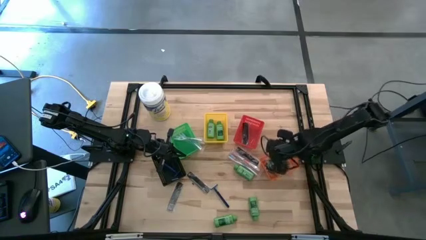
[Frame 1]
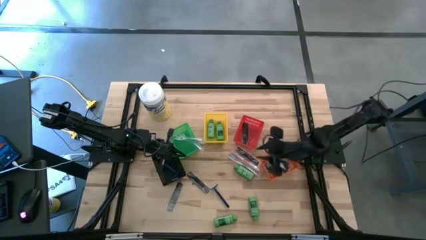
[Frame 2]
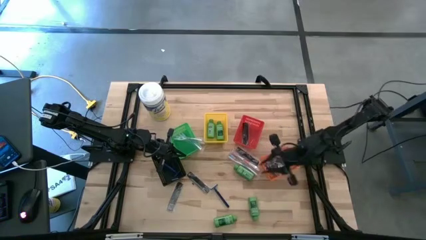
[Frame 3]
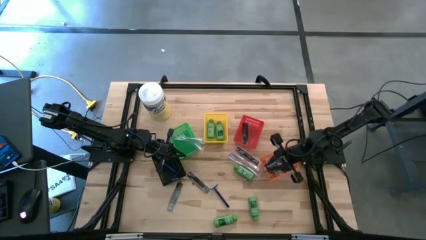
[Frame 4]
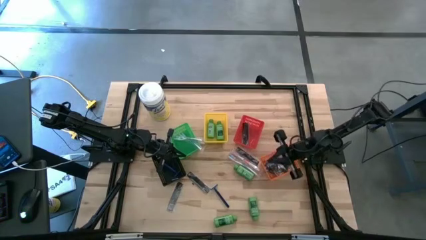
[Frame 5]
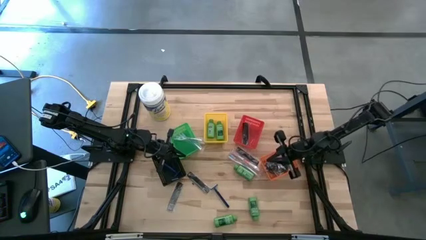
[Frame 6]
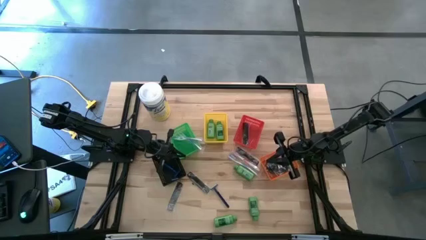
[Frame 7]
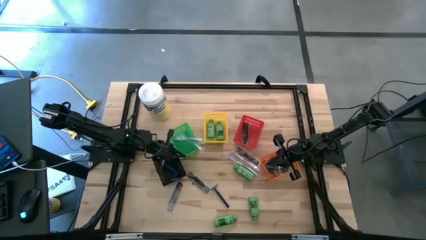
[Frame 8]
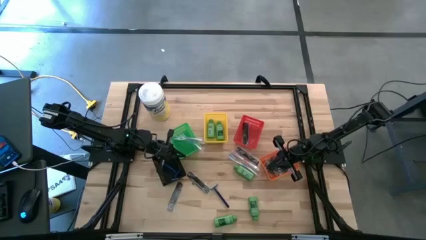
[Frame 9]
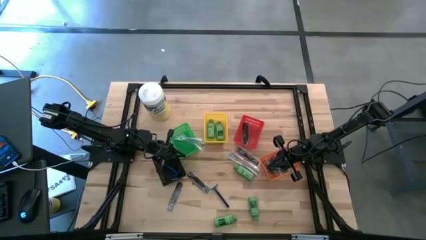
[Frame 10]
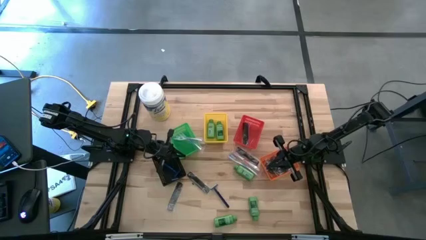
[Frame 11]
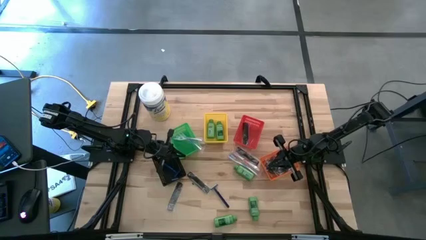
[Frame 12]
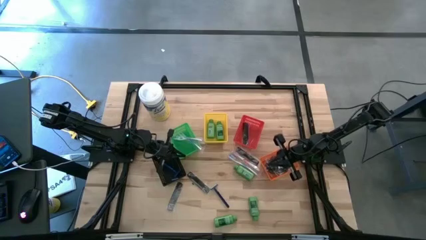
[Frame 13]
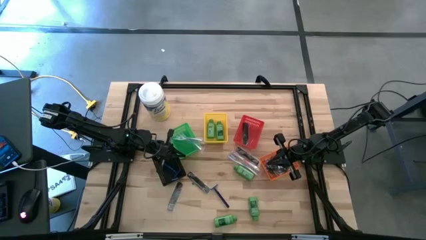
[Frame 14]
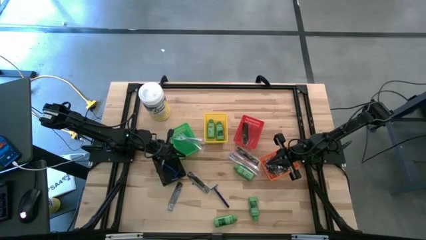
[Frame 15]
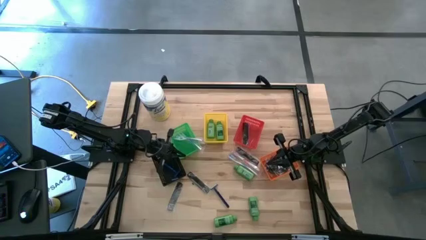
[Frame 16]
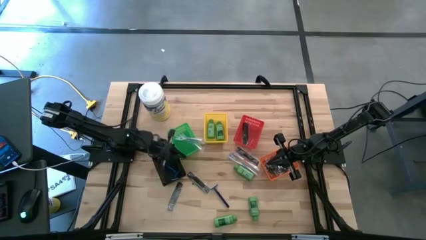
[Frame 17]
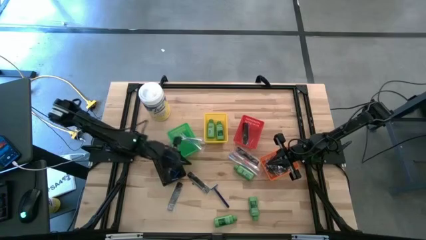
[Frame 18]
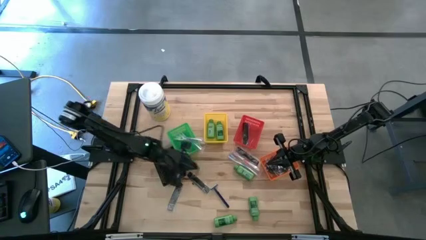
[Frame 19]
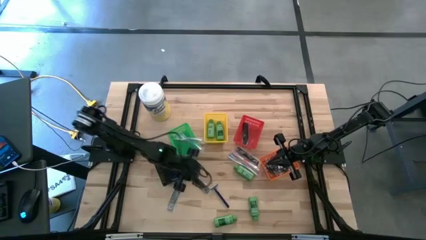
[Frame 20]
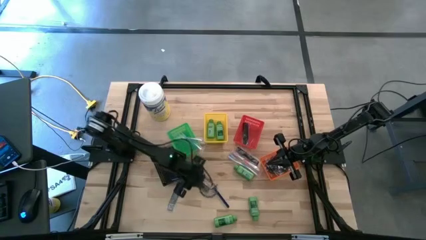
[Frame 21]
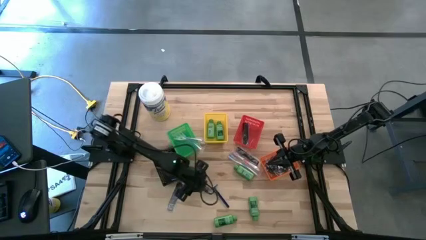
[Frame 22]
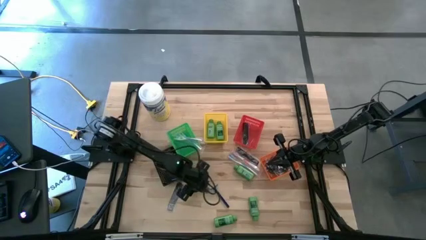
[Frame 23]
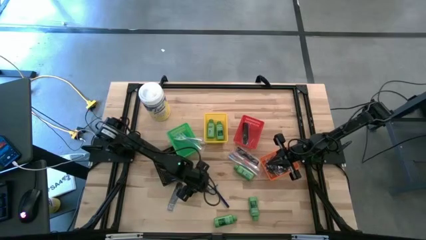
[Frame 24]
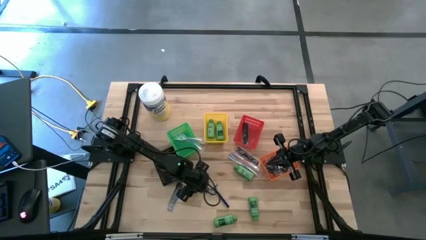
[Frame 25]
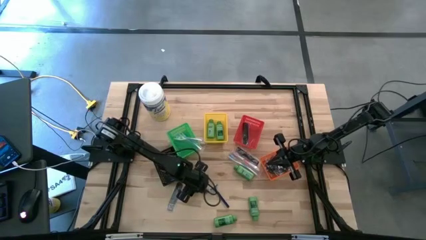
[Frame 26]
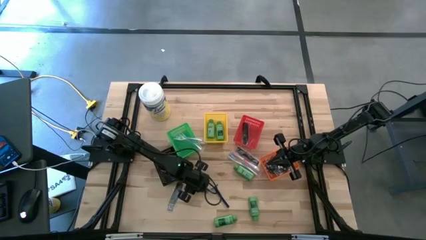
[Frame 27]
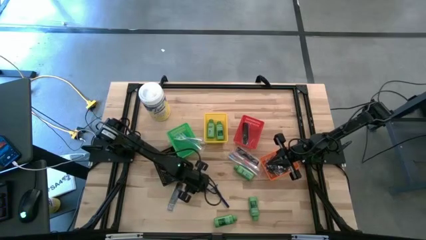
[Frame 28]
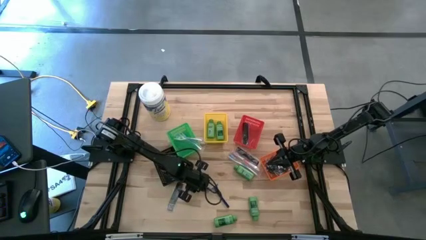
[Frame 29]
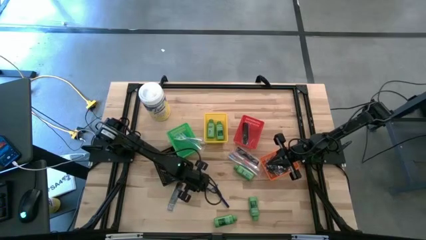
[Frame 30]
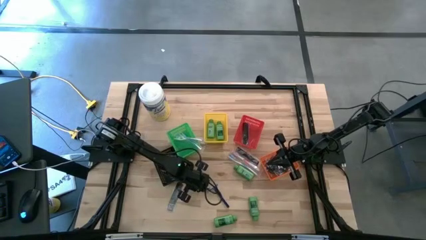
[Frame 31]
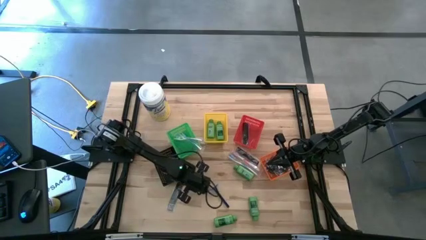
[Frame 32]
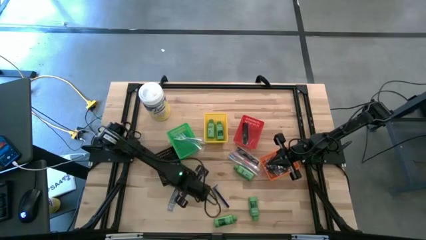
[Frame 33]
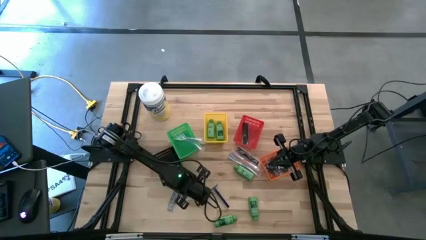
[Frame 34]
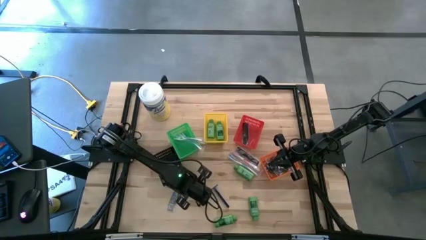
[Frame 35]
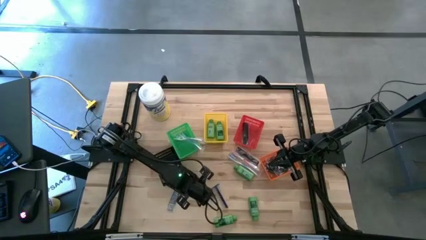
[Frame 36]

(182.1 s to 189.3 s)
Task: Pick & Place Travel size toiletries
Put the black comb into the red bin

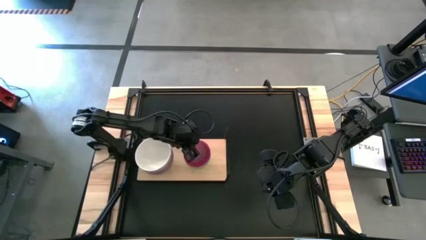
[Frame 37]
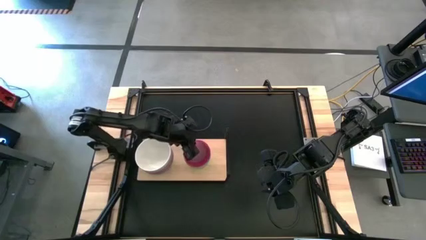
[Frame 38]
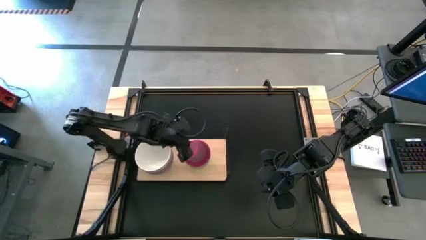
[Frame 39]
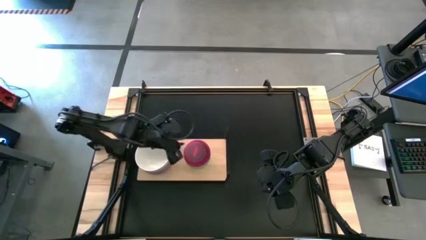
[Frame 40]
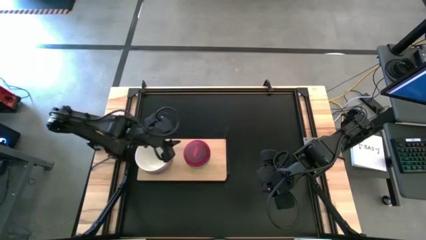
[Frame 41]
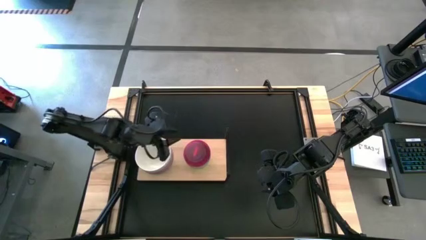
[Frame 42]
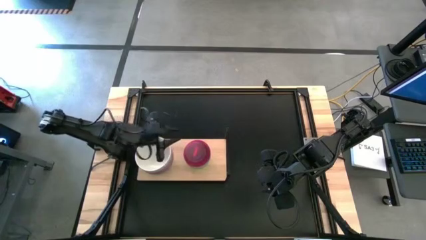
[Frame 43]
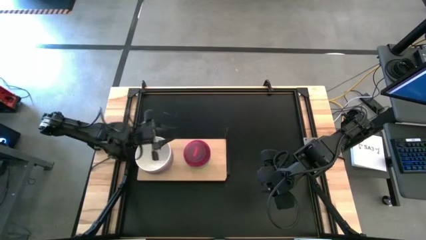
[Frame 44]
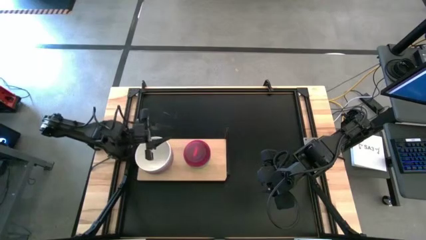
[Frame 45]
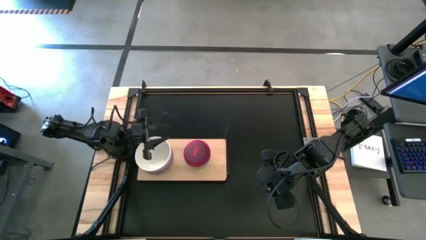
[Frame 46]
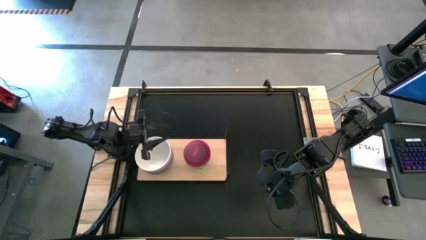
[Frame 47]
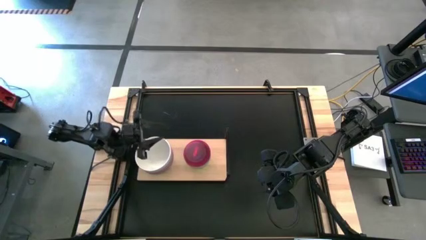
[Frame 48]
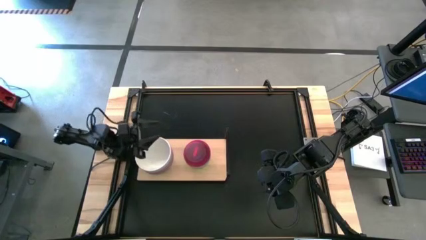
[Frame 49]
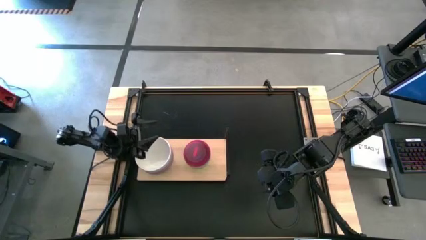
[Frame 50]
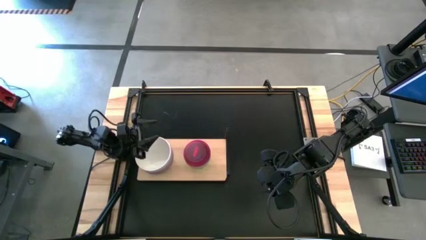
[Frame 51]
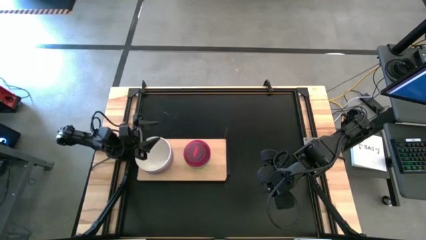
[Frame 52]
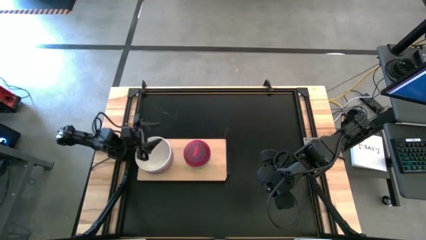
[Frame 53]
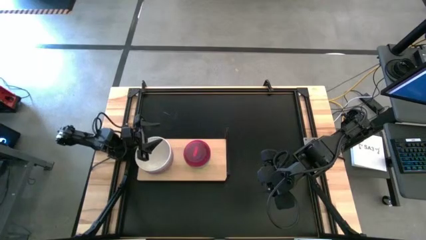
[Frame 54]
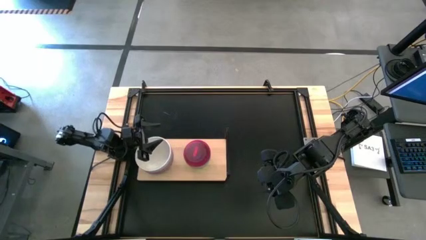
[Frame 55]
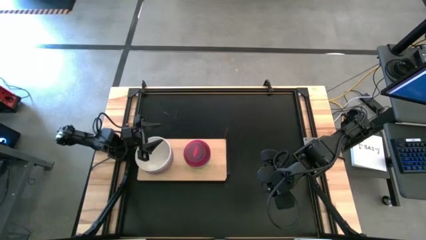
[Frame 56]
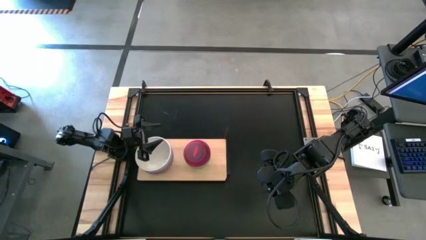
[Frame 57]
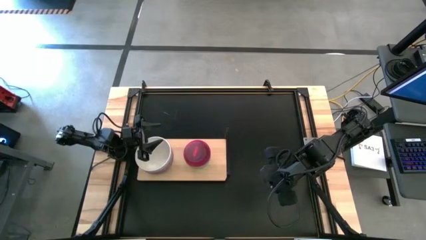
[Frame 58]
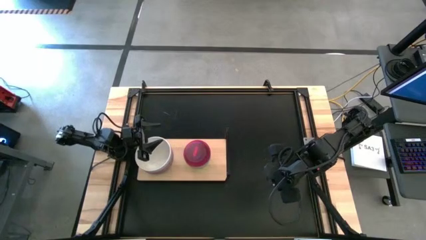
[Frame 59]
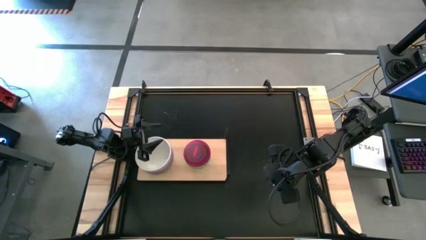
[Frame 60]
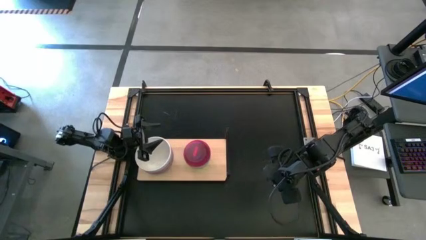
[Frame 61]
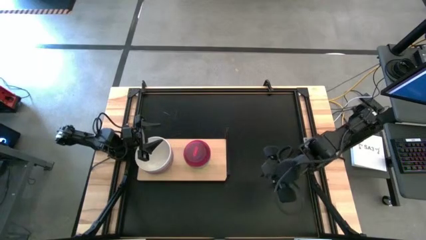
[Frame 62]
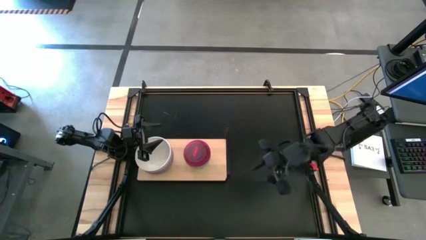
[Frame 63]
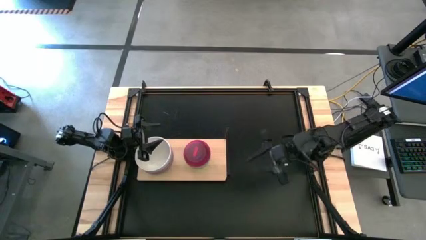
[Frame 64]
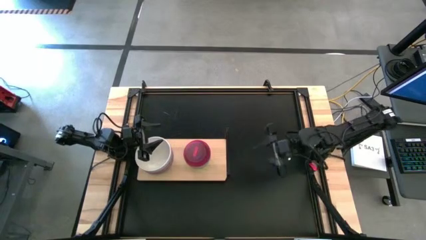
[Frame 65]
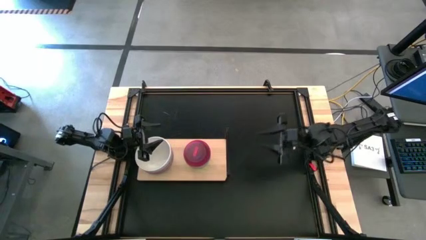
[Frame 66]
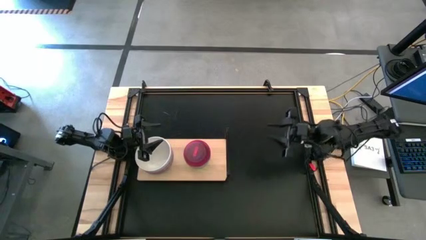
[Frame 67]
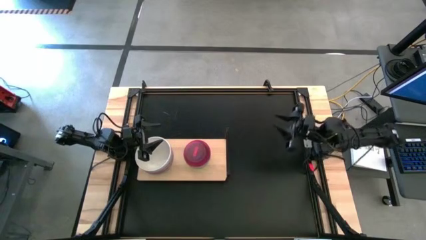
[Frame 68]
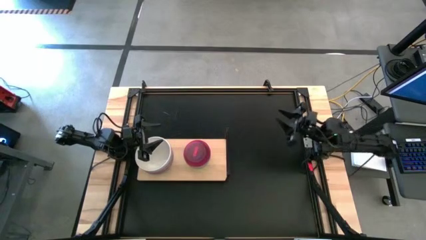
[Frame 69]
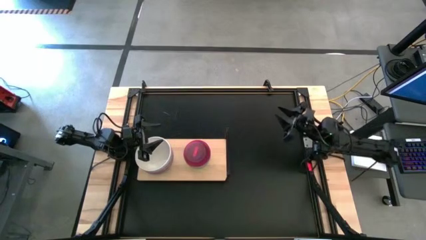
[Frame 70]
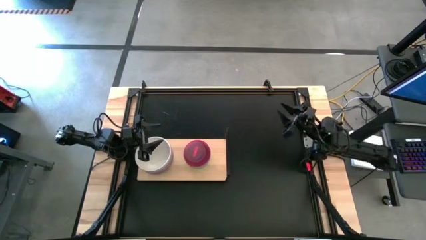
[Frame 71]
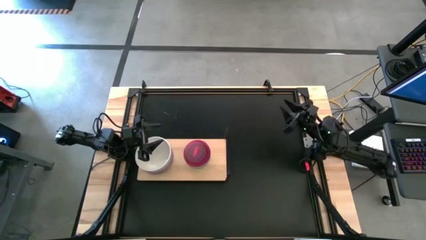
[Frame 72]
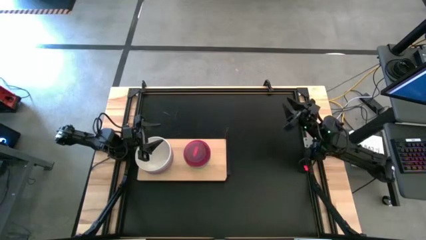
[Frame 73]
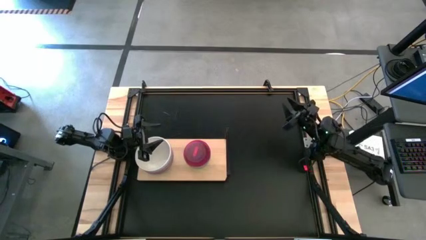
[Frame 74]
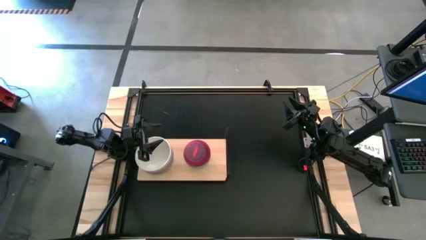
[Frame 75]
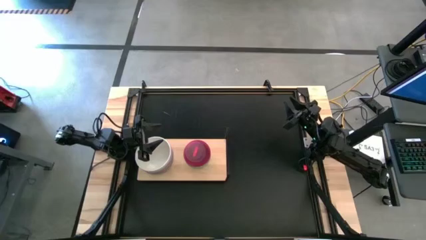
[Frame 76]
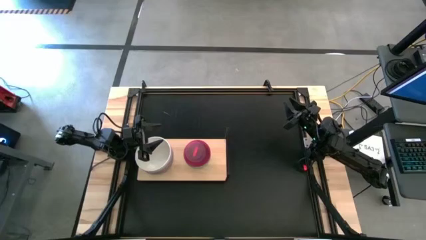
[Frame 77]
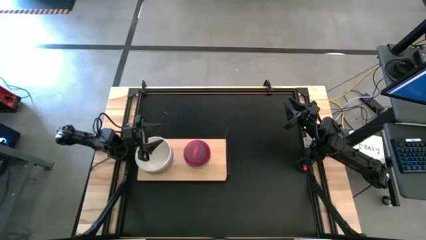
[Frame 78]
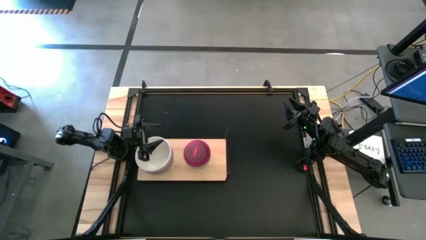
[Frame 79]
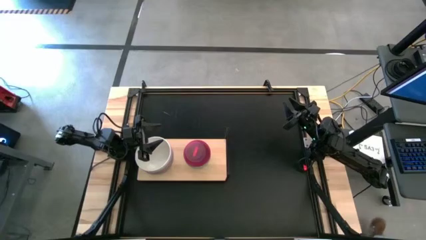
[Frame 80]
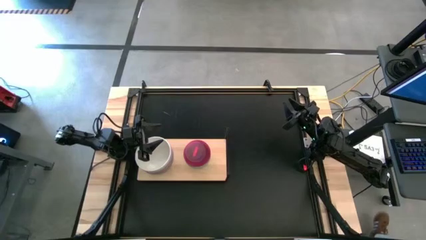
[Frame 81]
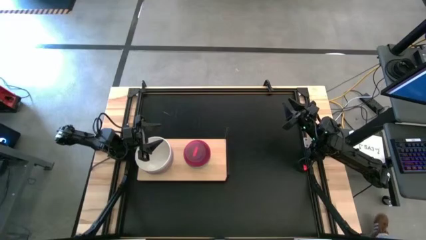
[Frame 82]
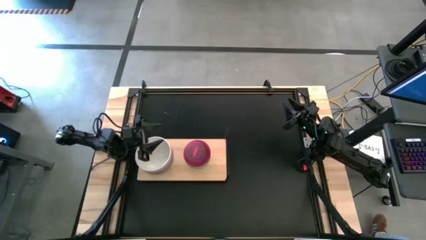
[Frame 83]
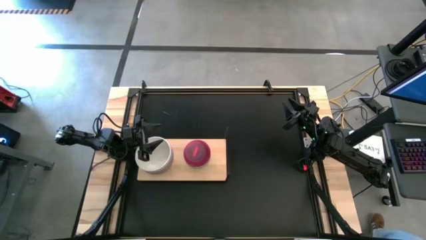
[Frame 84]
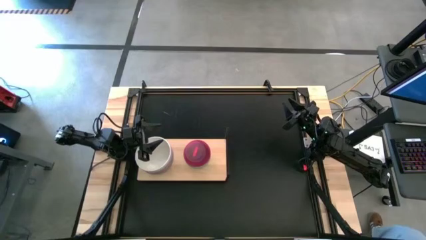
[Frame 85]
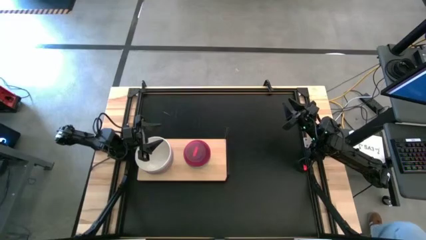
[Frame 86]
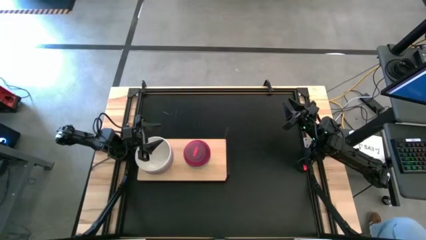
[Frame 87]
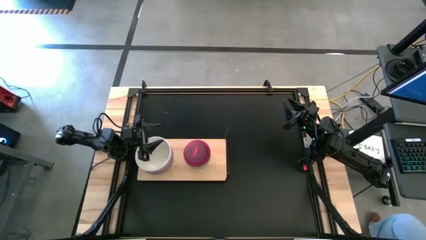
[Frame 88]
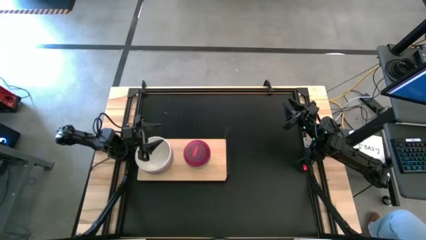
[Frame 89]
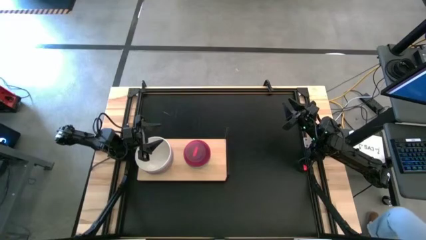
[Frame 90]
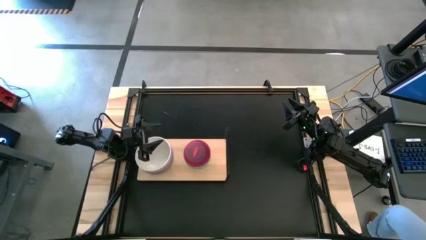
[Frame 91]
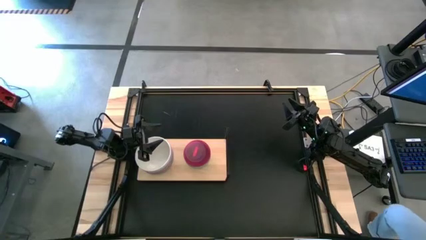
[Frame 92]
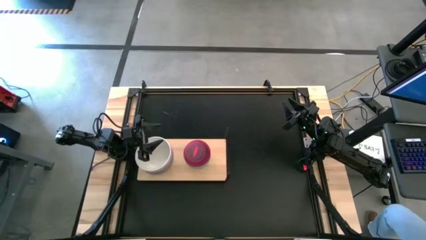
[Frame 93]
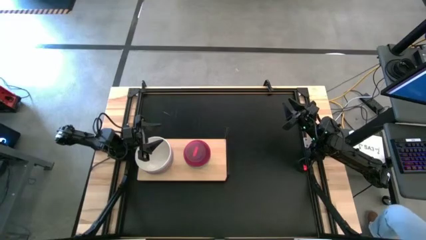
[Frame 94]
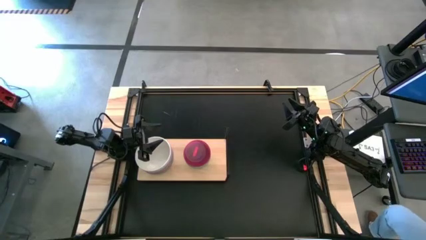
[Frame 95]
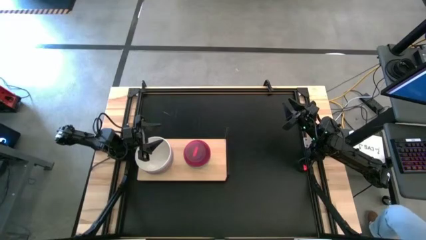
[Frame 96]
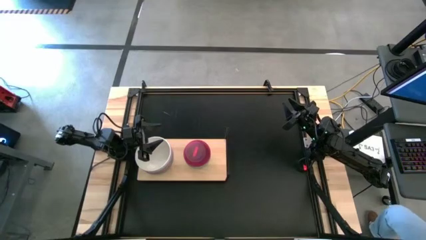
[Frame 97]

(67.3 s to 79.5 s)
Task: Place and stack bowls onto a shelf
Return to Home Position
